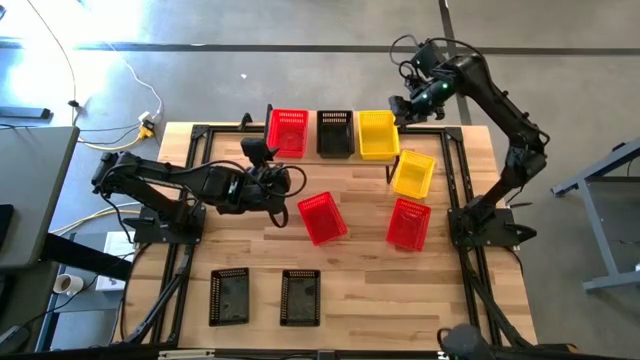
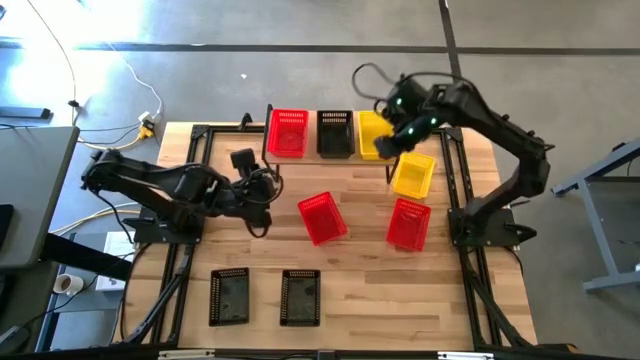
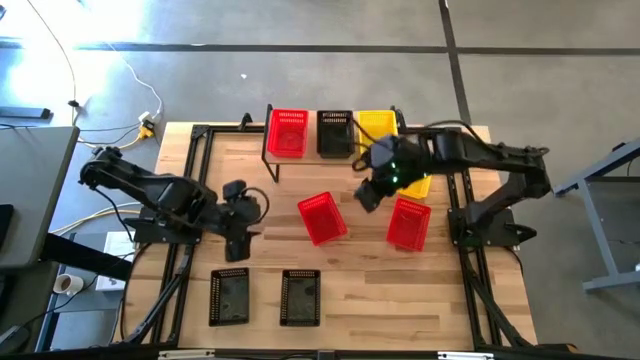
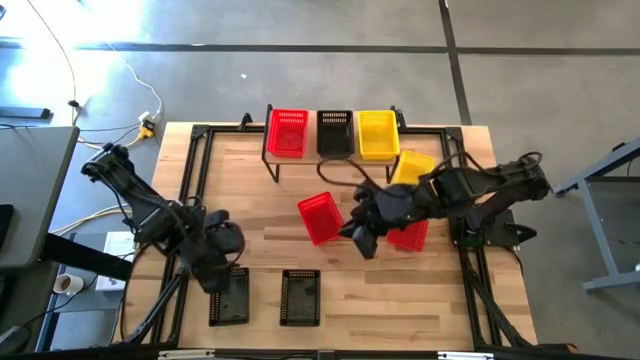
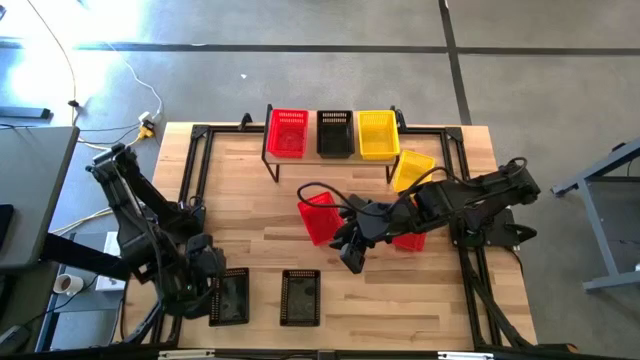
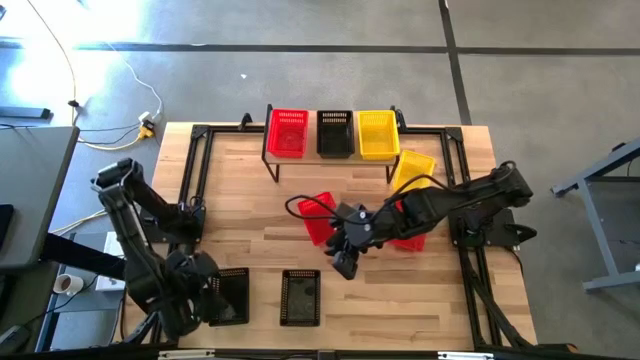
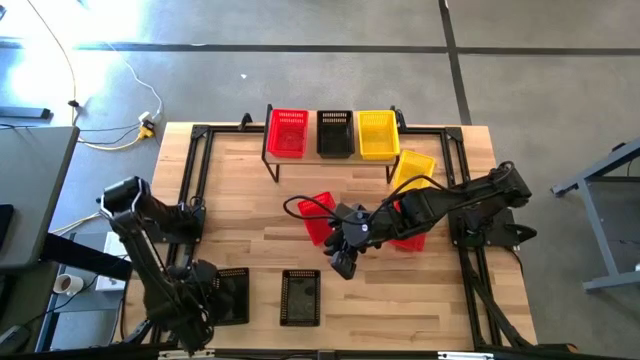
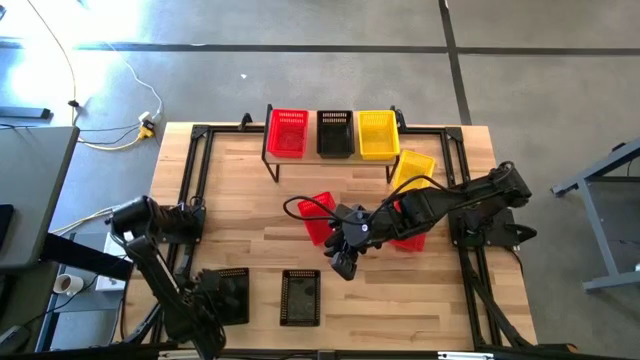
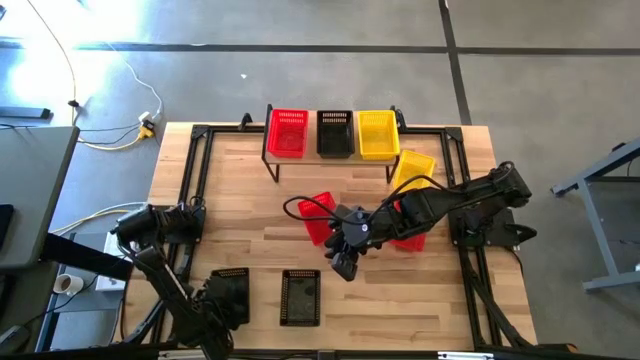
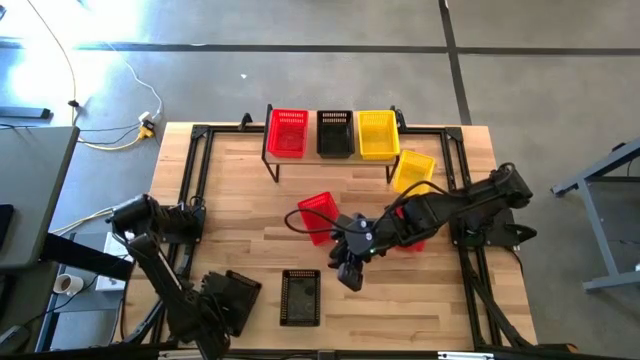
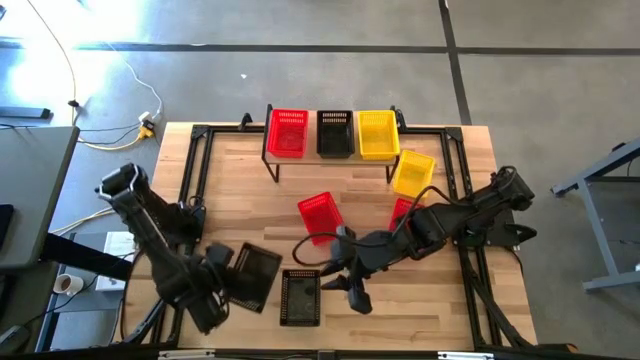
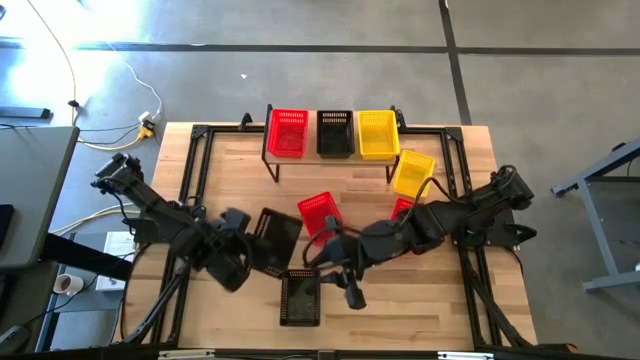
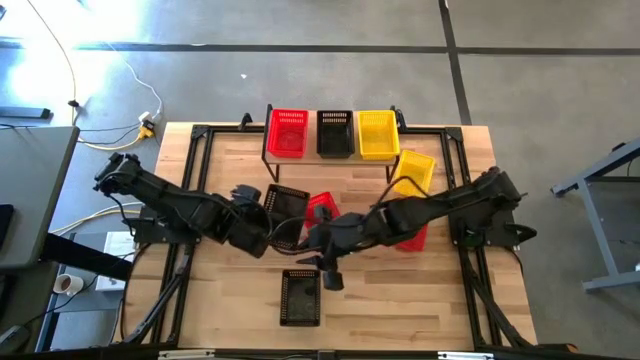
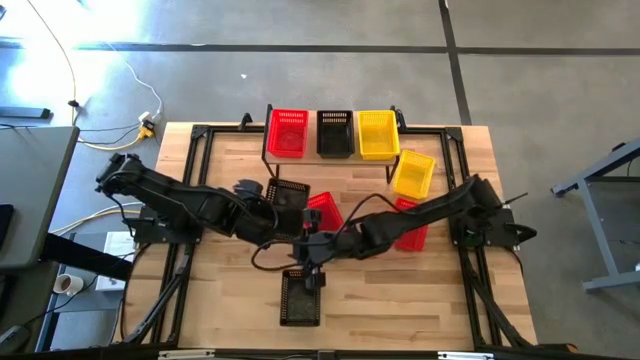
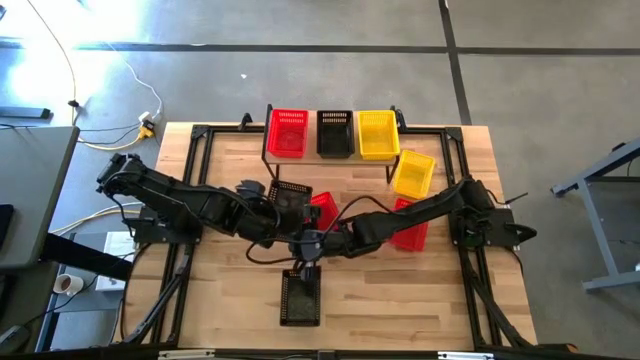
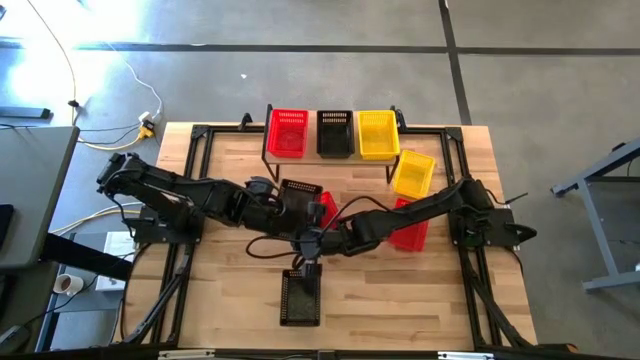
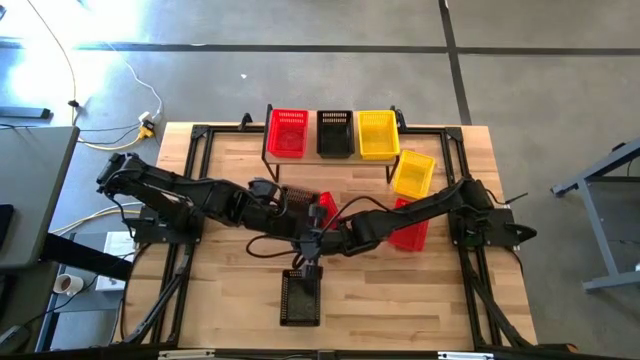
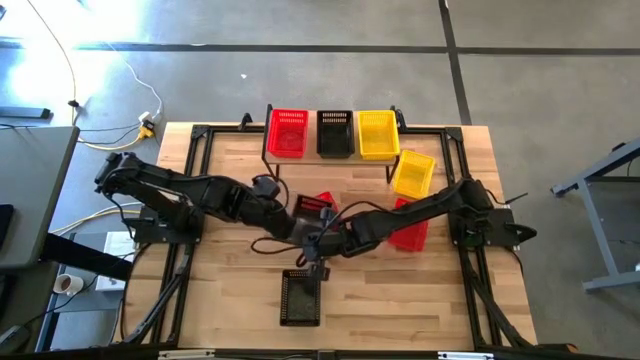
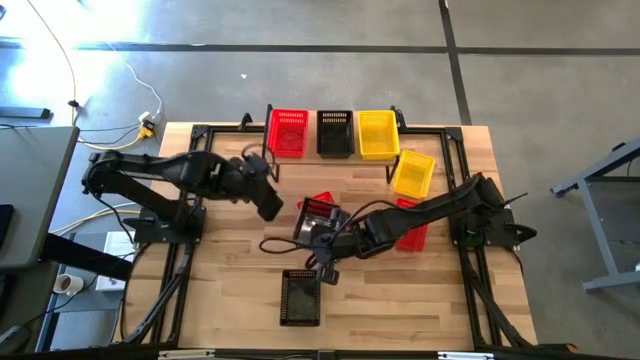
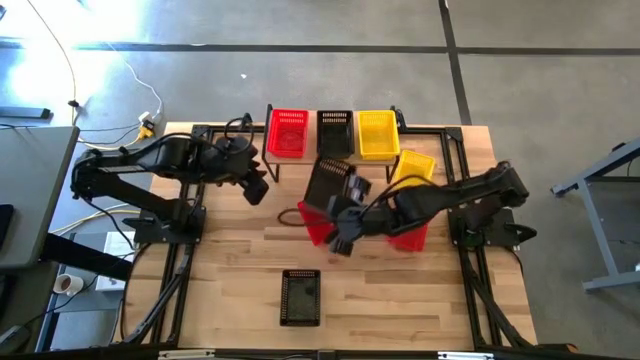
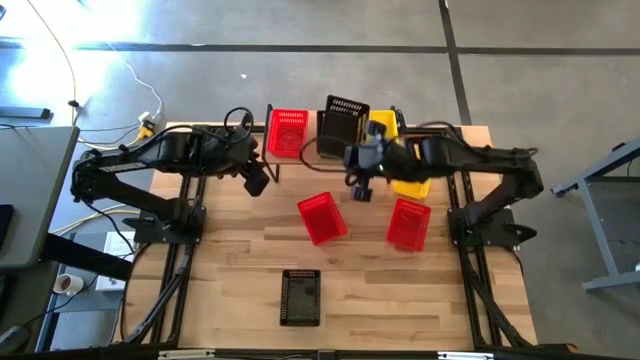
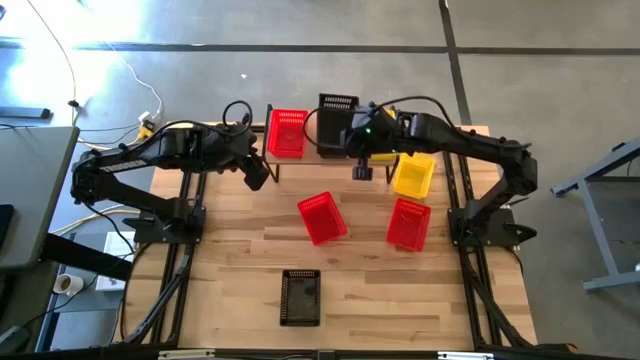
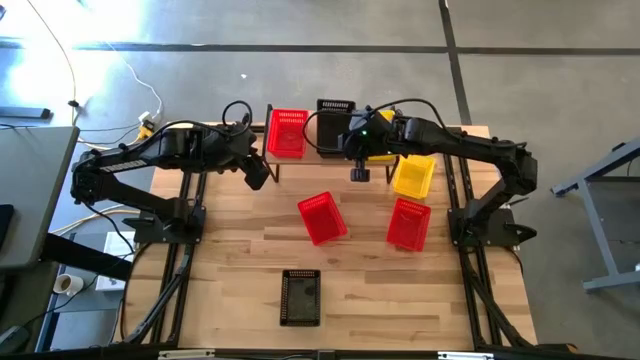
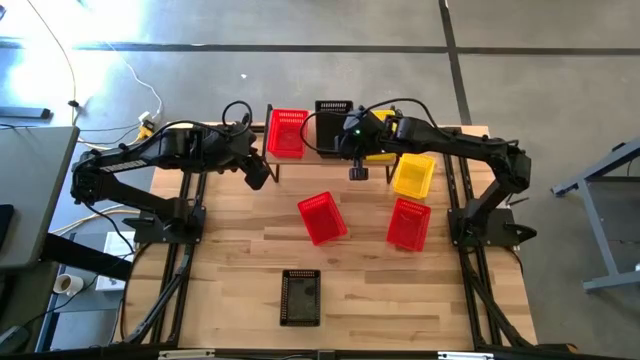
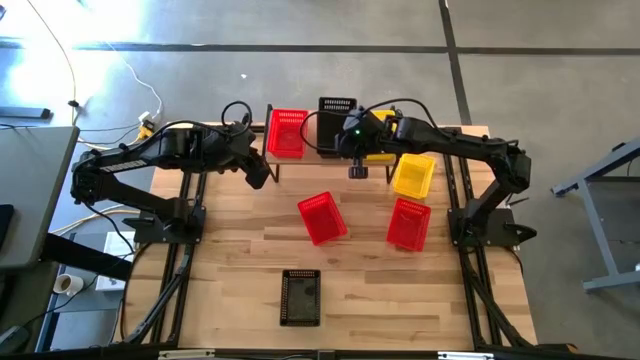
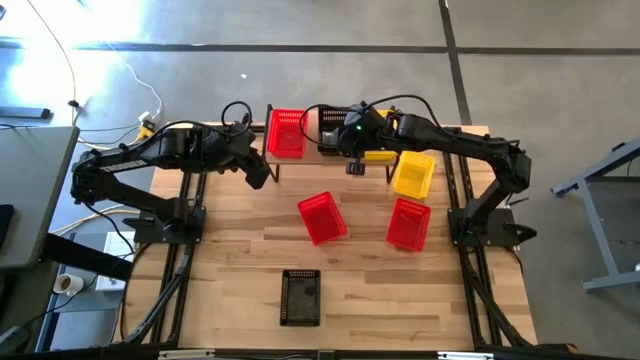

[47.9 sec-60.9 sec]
Task: Stack baskets on shelf by color
Stack the left black bin on the top of the black bin on the shelf

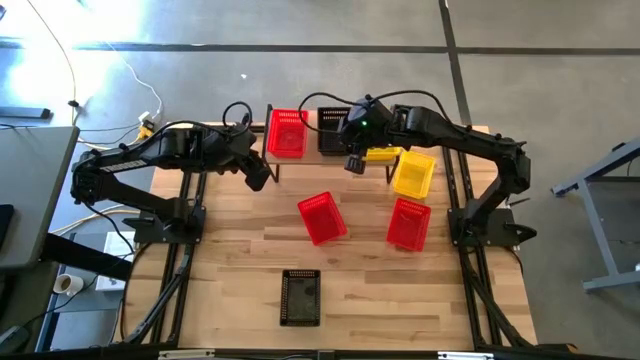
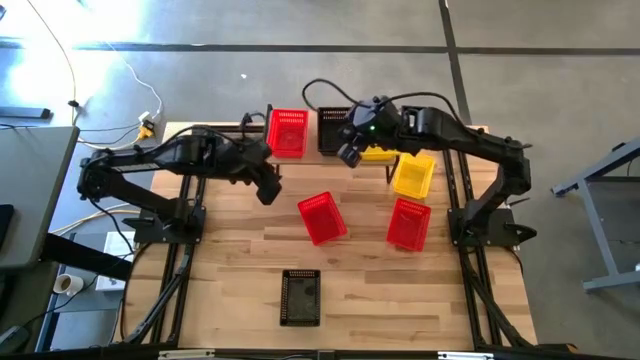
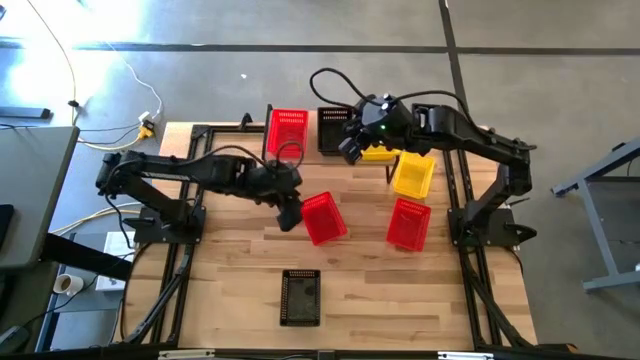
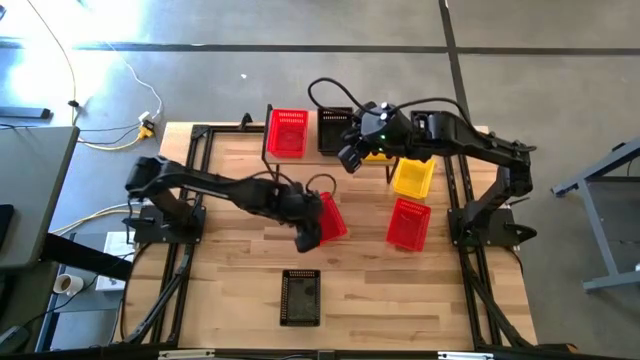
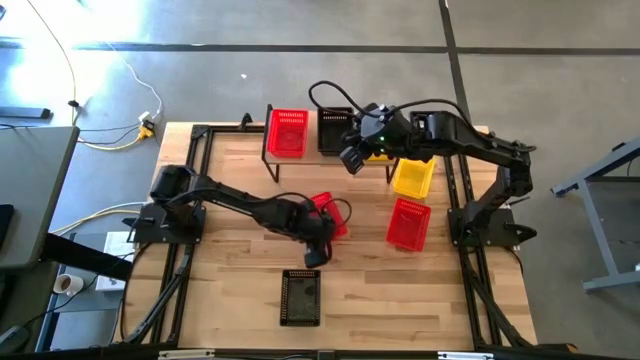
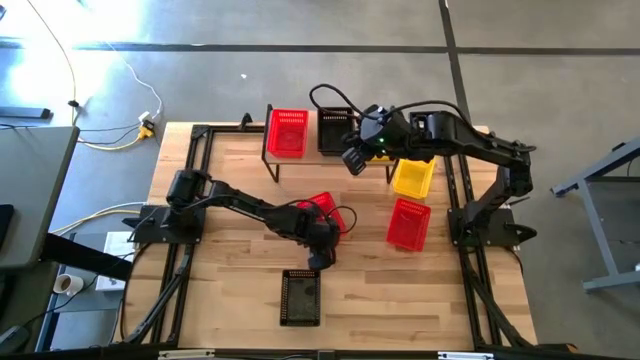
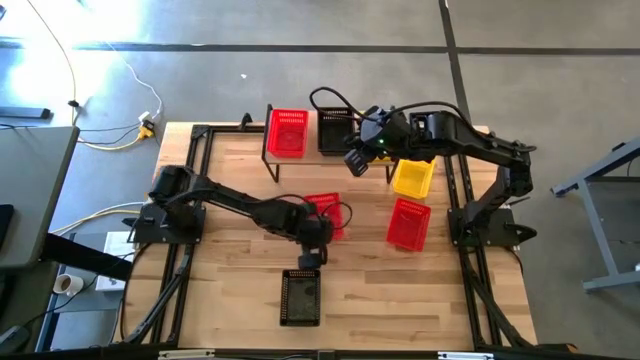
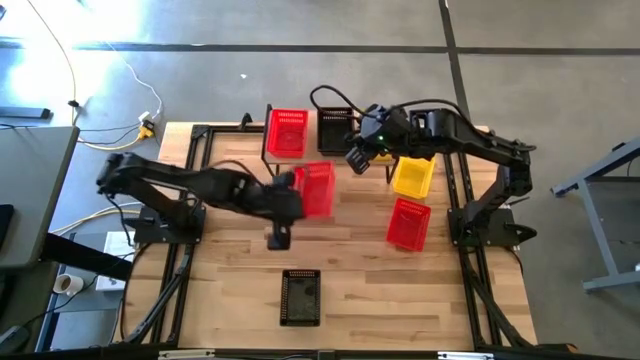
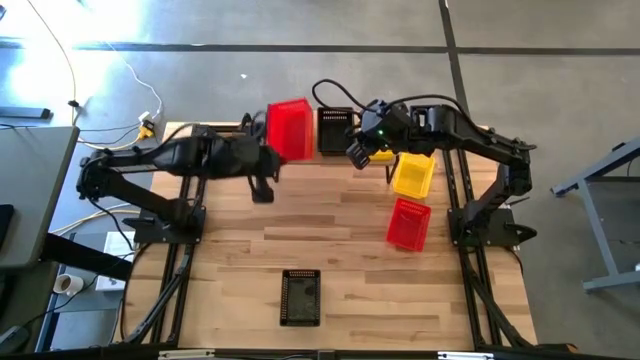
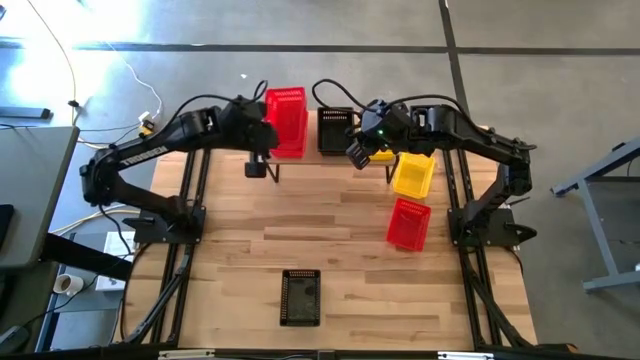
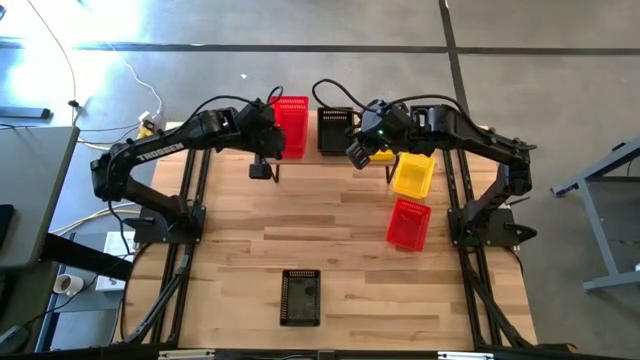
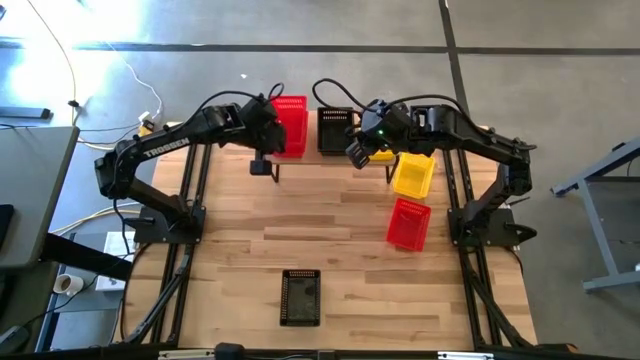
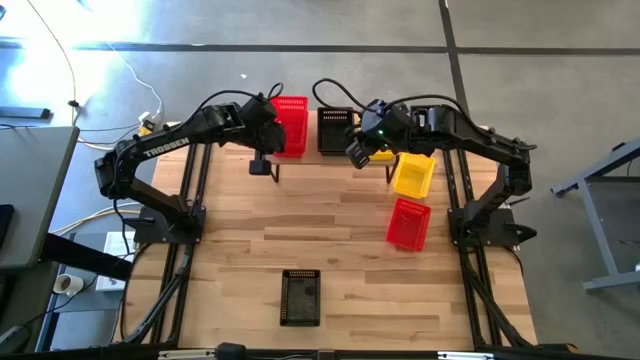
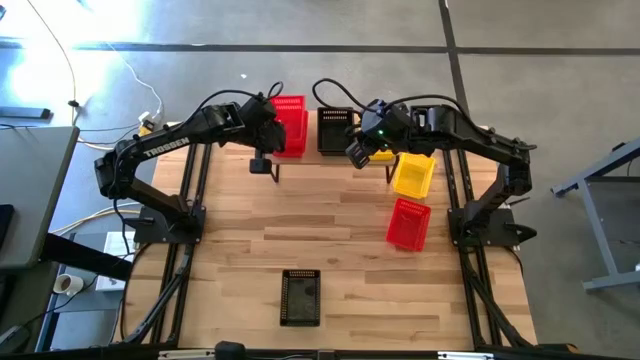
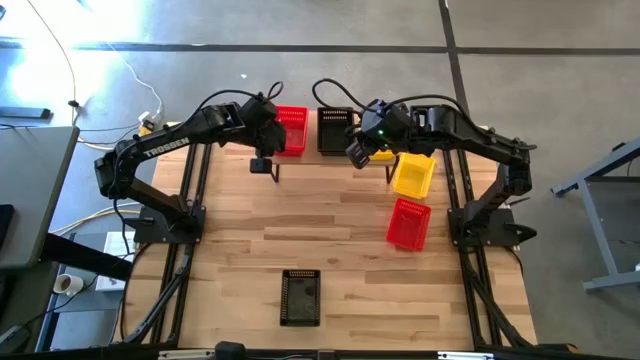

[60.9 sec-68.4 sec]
Stack the left red bin on the top of the red bin on the shelf

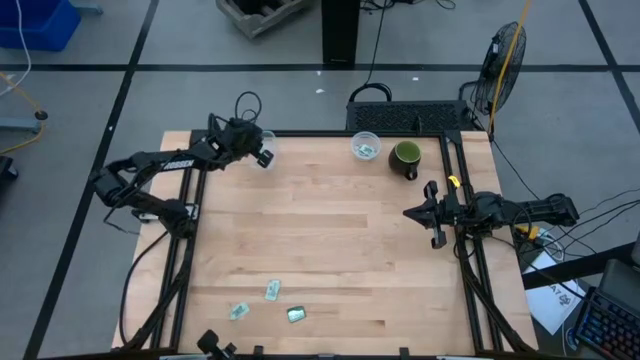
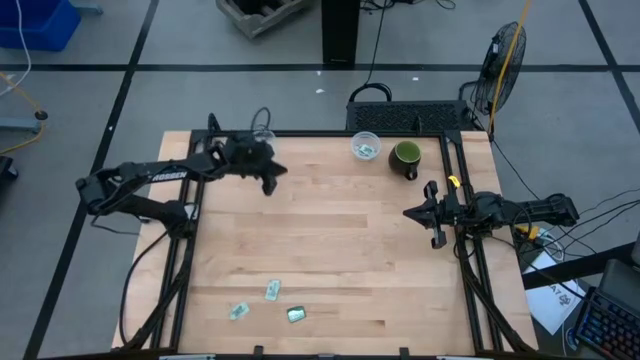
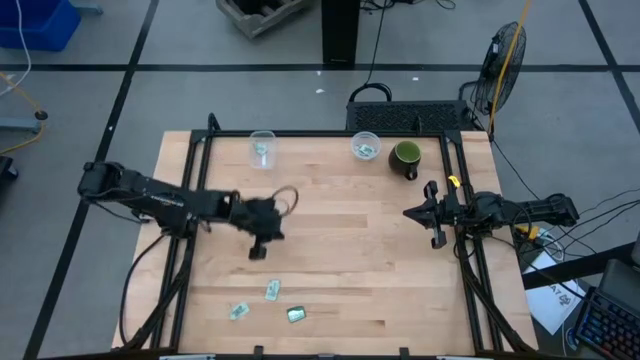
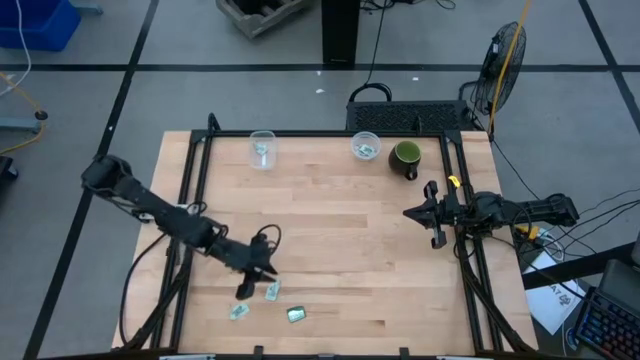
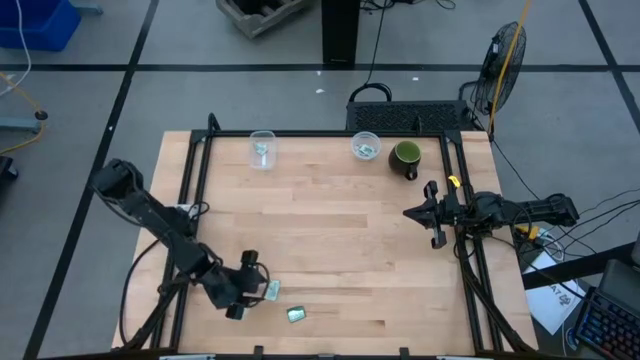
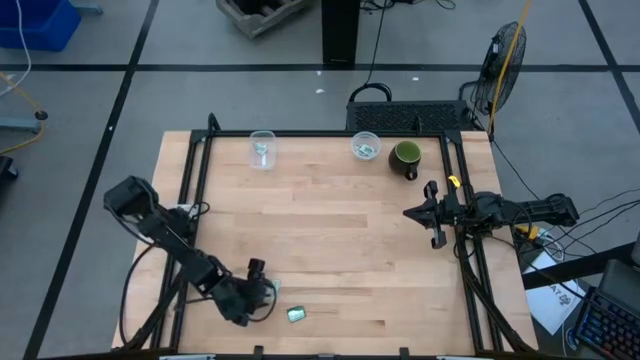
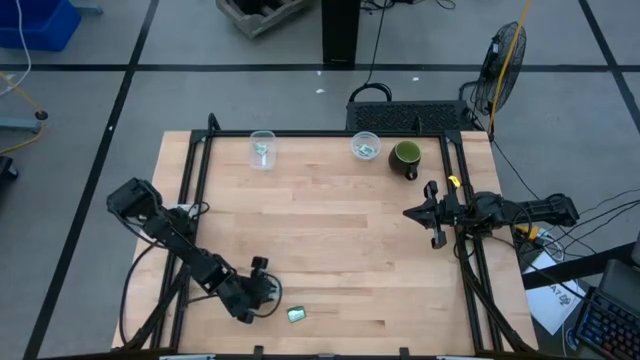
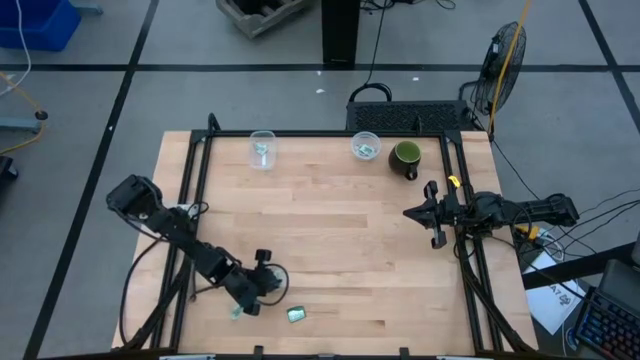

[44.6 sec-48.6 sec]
Task: Pick and place items into bin
Put the green stevia packet into the left transparent bin
